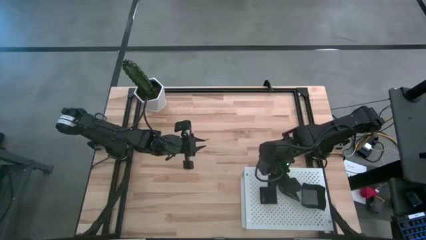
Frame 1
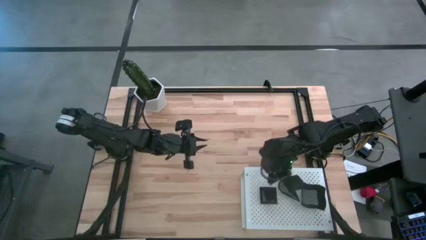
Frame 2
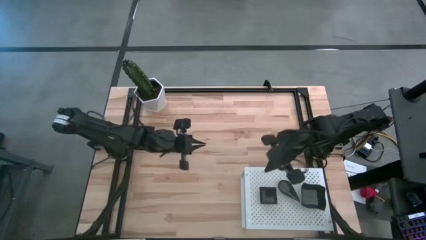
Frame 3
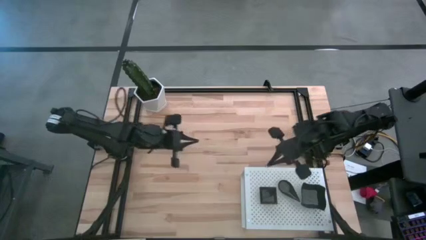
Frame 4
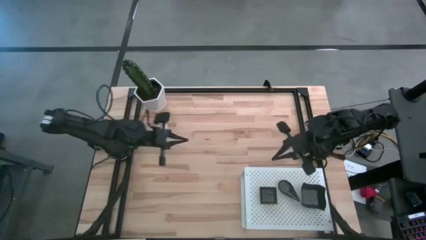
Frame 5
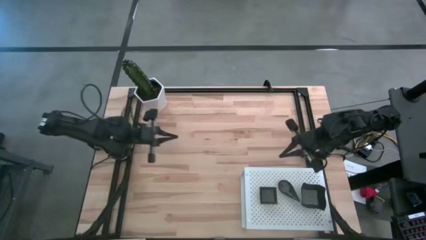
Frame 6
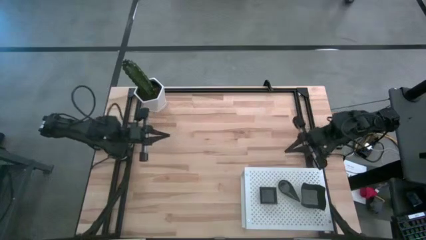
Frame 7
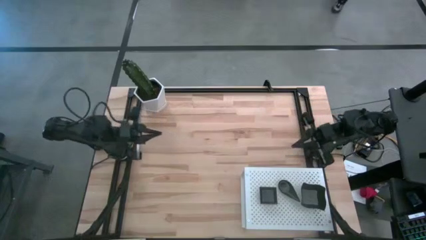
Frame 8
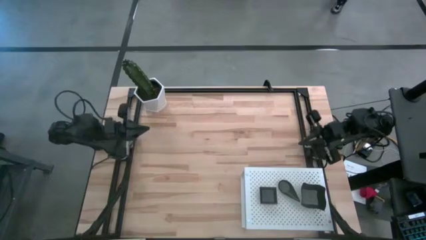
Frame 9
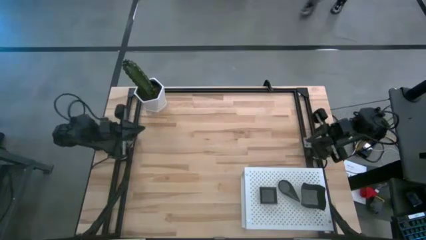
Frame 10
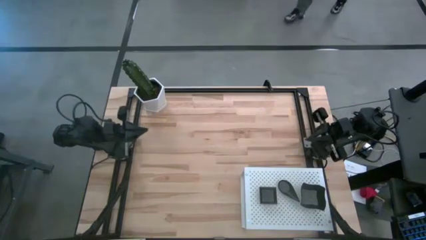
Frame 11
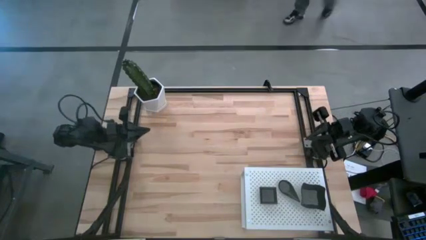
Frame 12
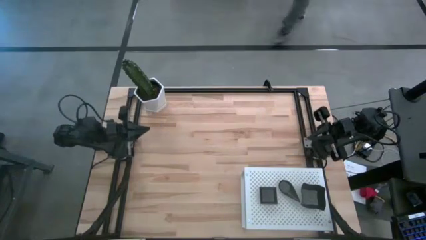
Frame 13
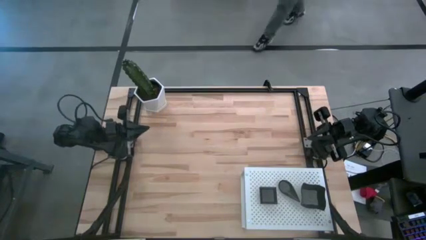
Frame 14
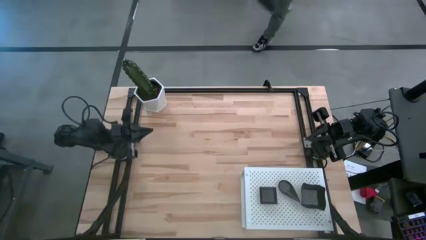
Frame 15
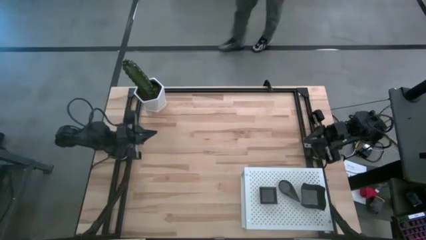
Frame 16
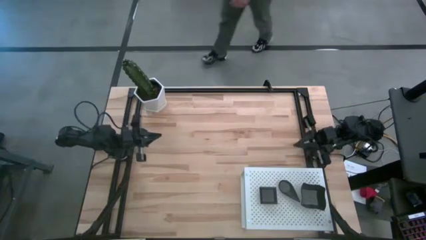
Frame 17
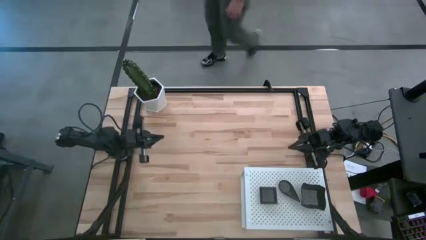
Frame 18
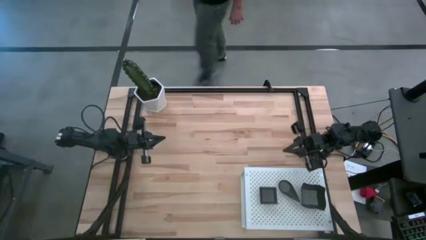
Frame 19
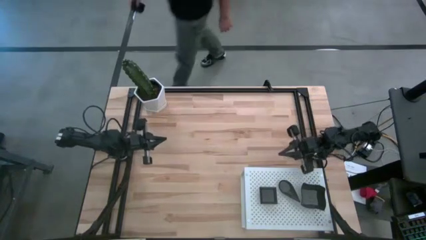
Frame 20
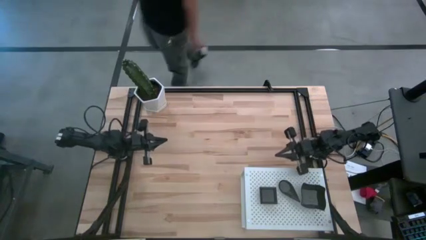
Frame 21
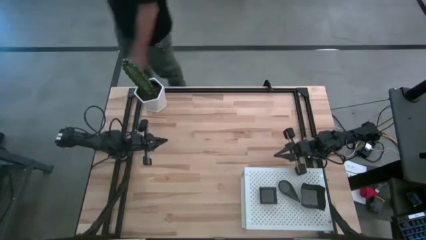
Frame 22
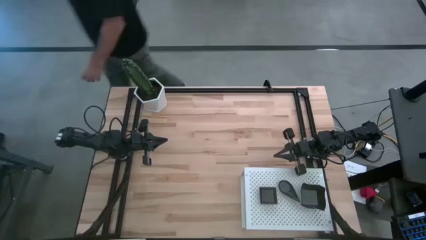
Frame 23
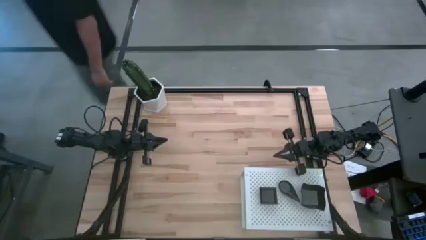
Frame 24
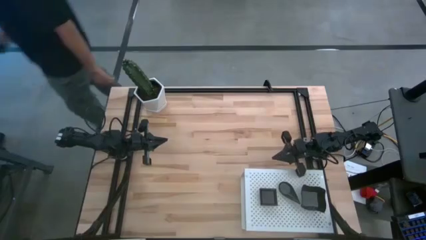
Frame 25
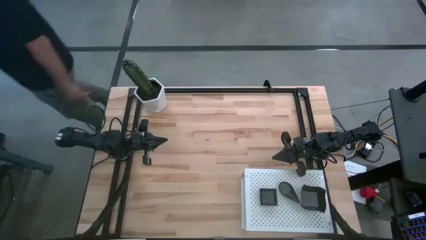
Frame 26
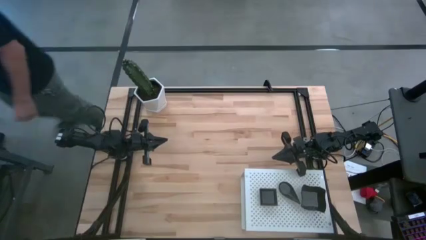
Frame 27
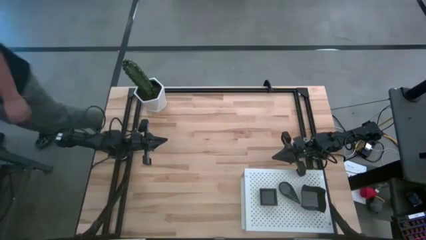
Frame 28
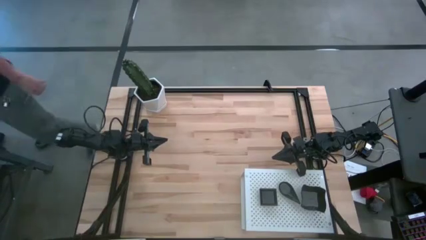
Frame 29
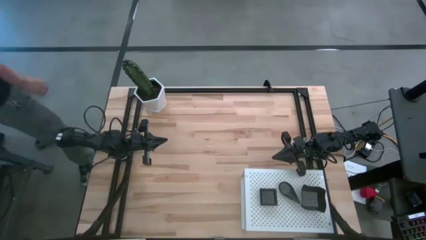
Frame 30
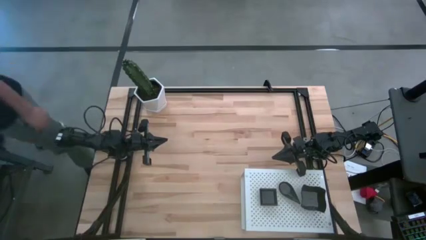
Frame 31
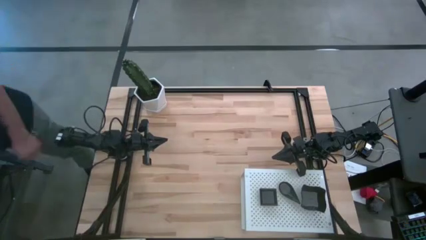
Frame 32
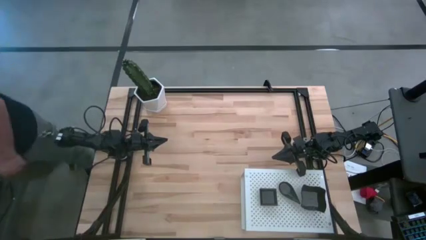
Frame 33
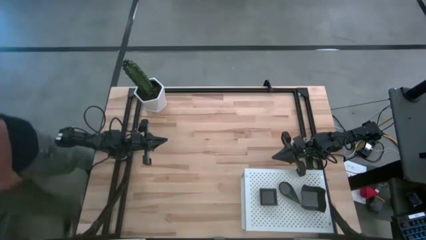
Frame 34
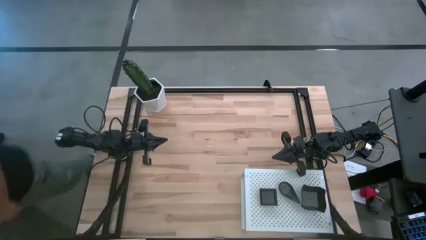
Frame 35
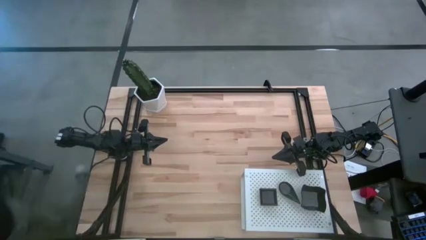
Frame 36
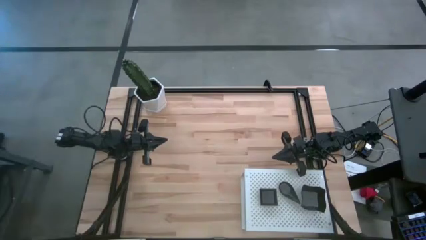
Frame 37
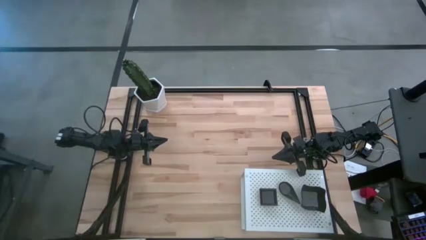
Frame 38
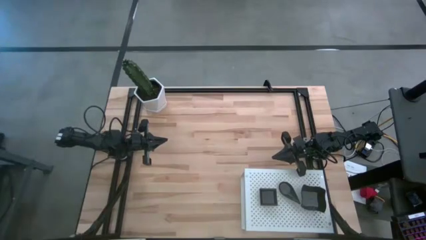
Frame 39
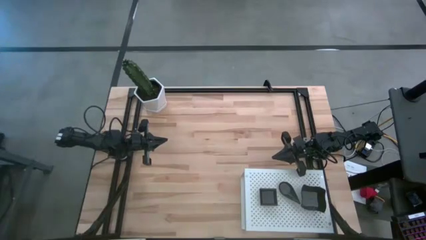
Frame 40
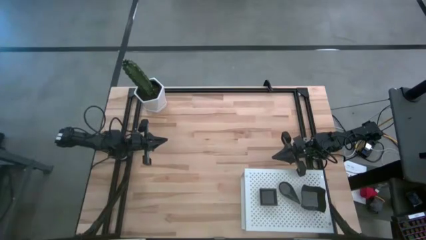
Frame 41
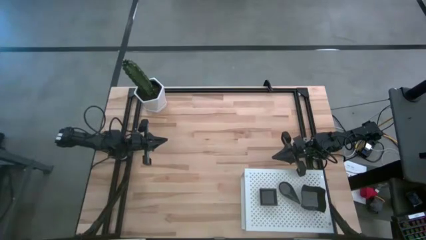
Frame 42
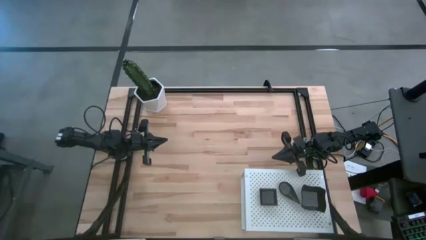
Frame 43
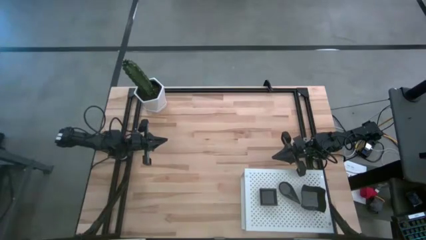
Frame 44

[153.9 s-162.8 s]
Task: Pick & Place Mini shaped plates
Return to Home Position

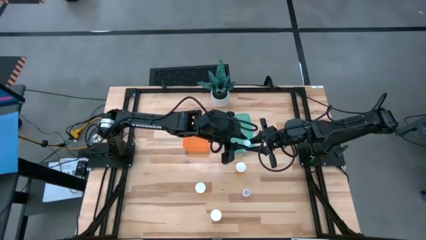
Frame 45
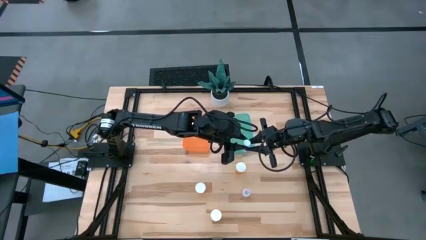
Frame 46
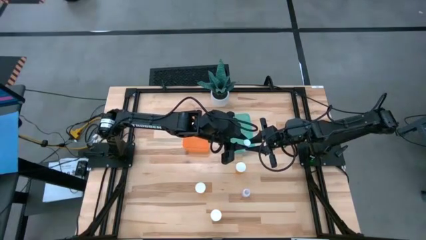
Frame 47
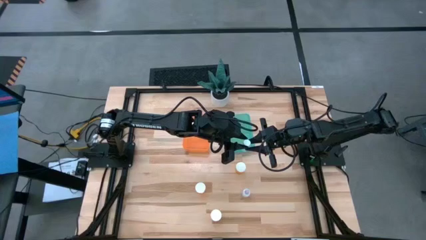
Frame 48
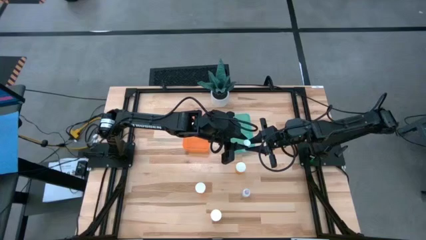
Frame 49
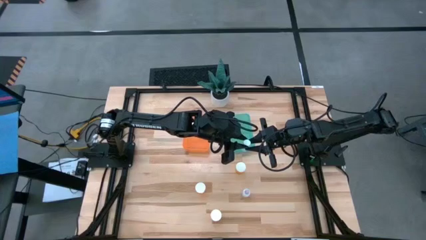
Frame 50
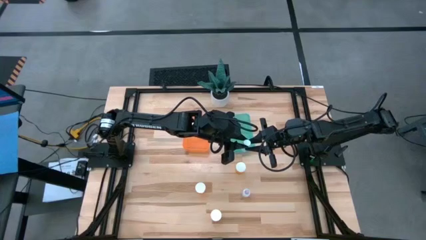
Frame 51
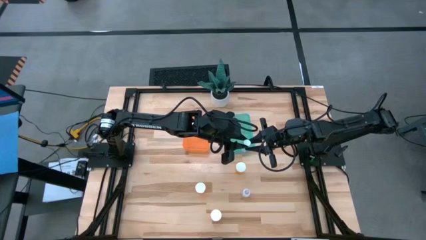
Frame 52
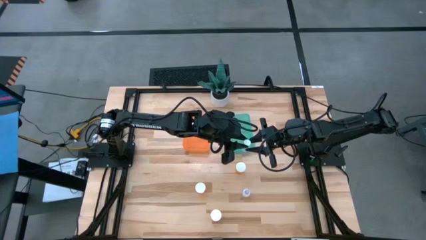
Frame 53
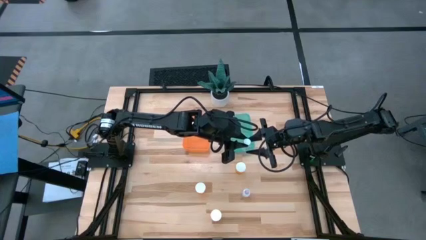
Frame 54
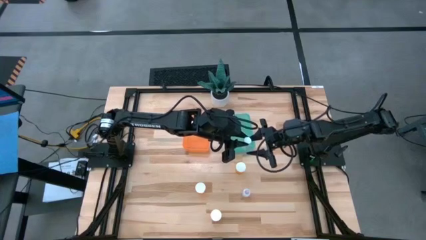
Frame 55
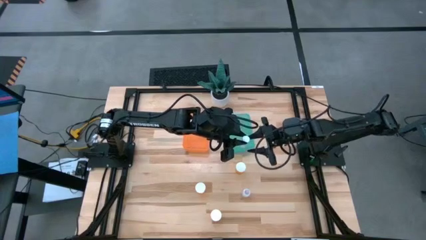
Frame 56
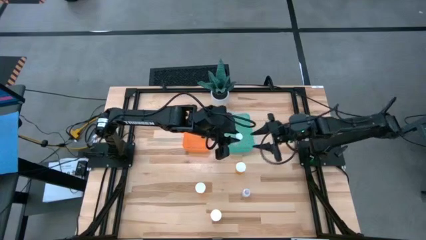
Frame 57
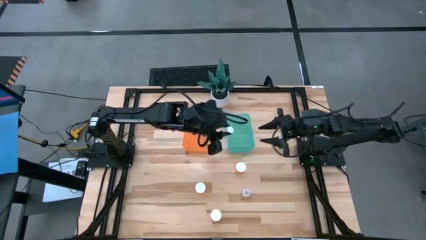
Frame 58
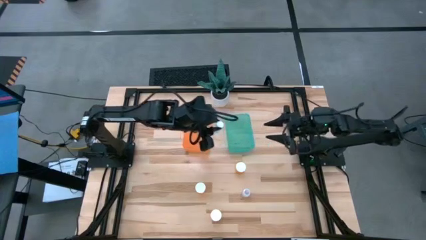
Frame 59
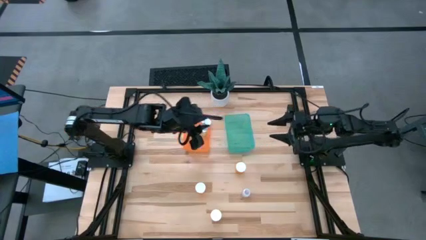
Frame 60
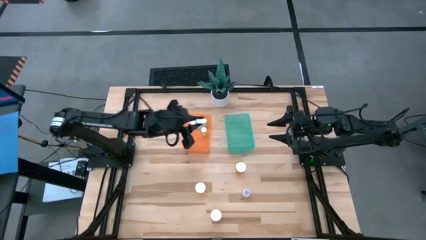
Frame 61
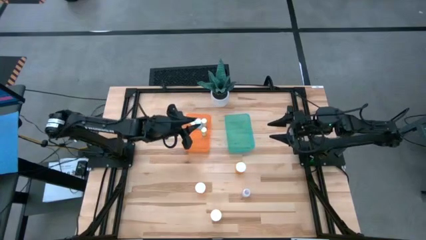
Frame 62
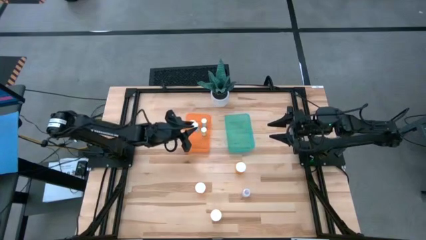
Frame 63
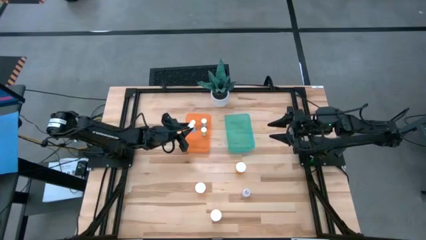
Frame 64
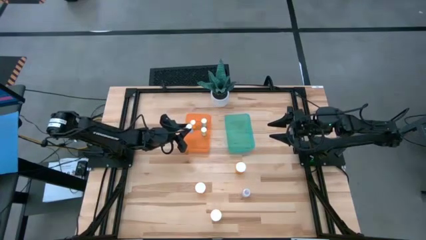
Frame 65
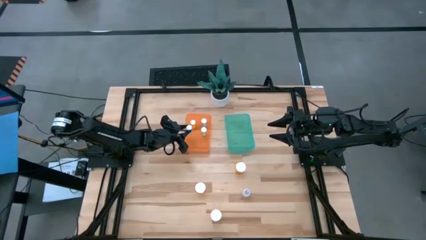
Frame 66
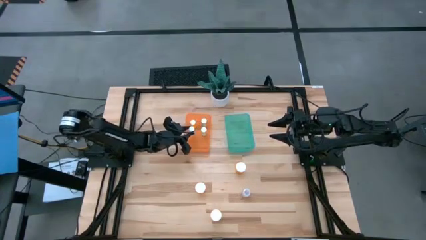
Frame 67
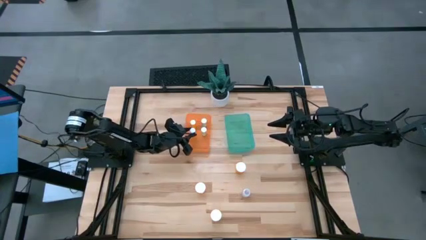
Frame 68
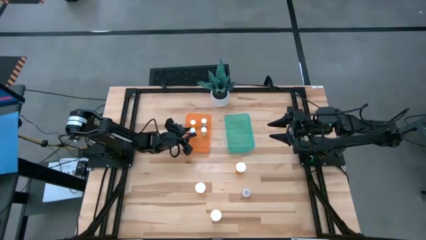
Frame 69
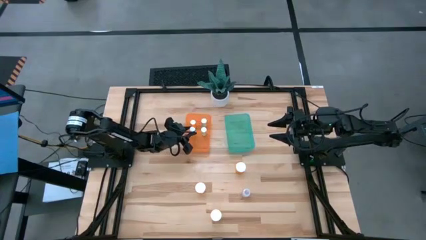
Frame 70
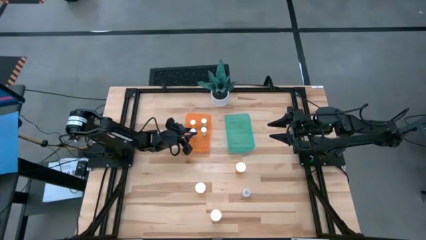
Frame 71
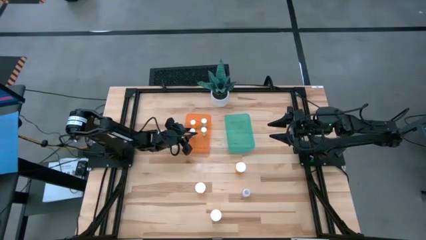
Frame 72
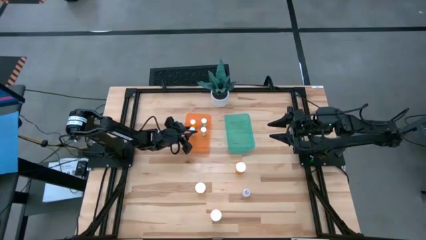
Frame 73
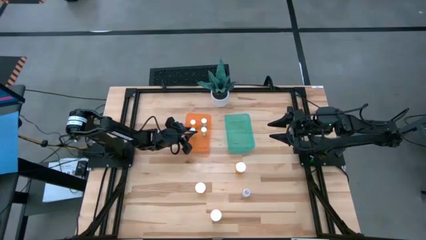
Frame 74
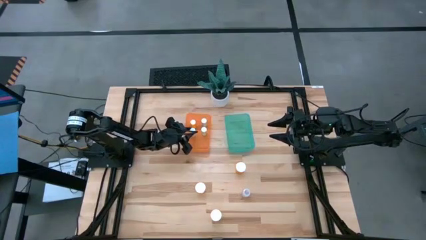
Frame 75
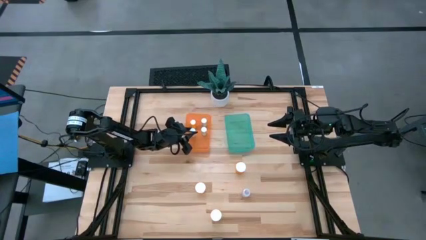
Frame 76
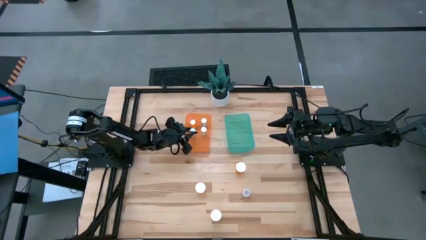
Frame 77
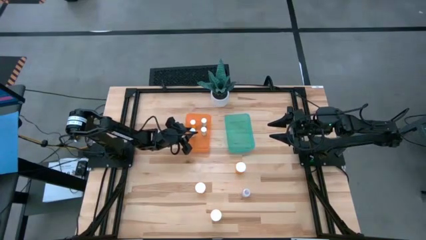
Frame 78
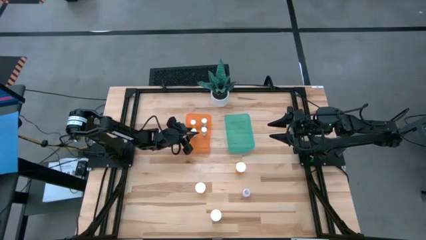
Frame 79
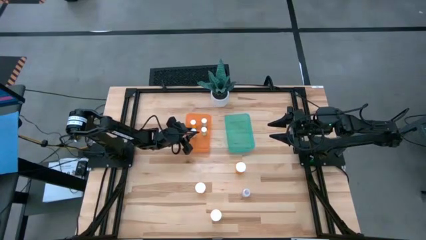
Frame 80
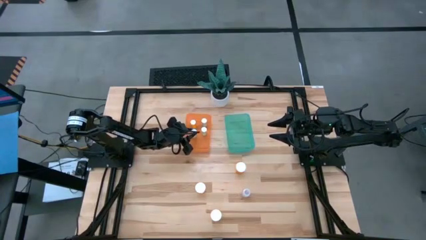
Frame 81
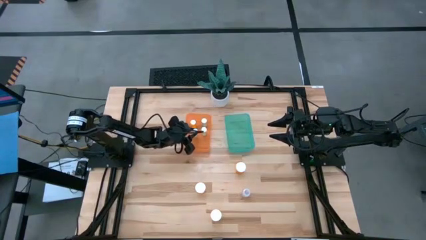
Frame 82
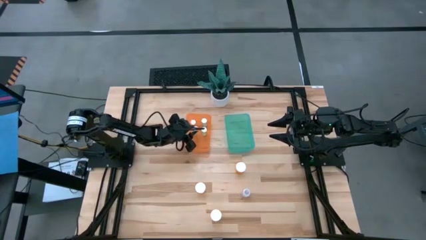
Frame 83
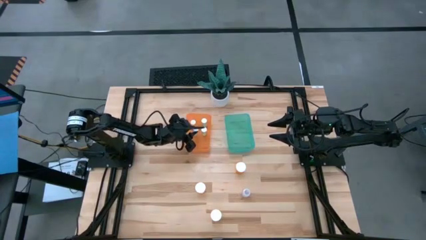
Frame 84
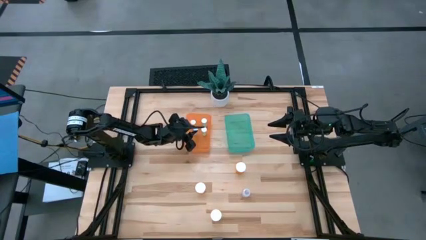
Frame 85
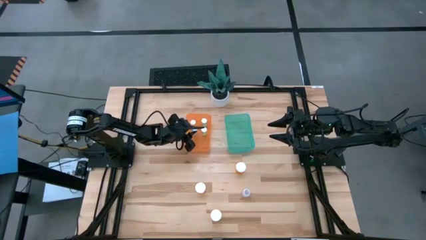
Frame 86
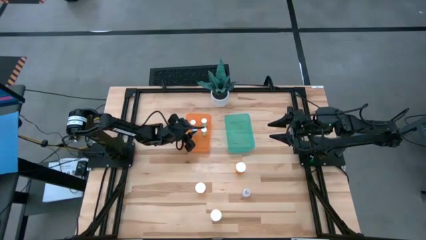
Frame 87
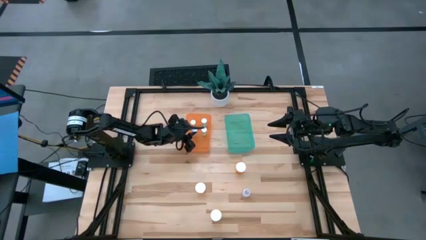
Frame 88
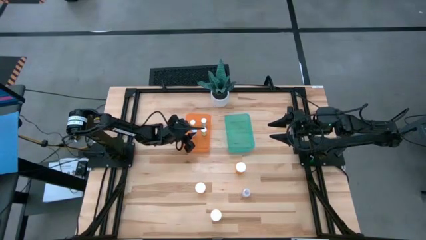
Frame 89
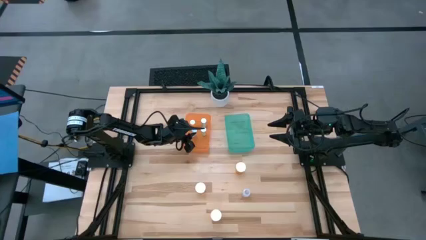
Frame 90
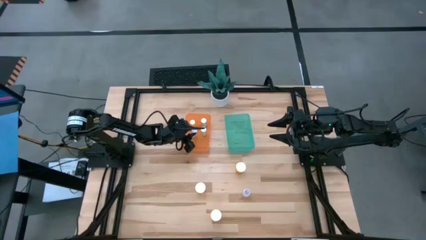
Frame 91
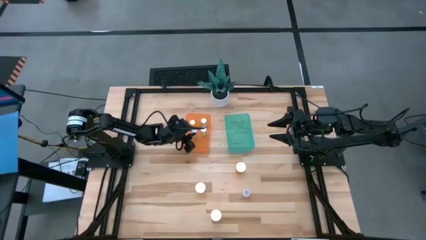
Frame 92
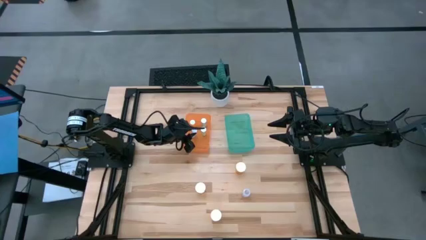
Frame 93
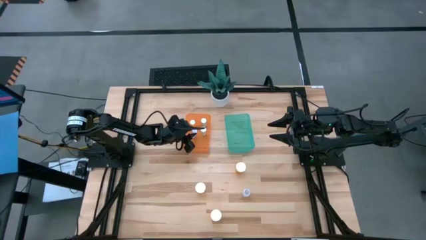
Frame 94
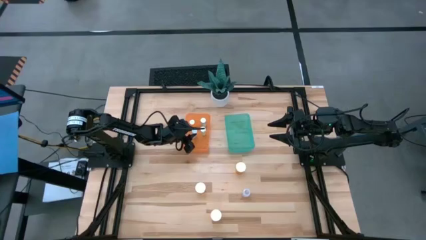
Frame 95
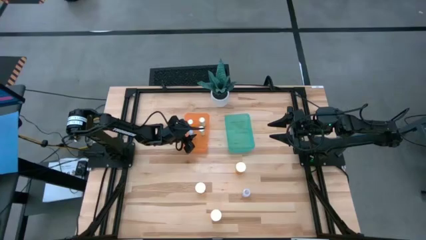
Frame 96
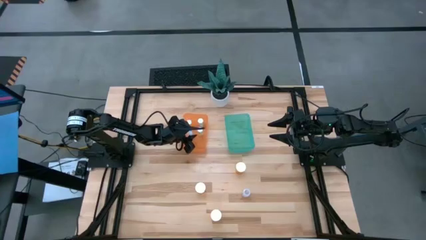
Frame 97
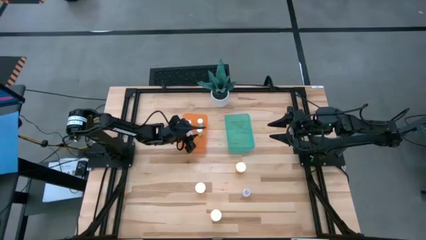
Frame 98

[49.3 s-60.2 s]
Task: Pick and place medicine bottles into bin by pill shape (circle, oval)
Put the blue pill bottle into the orange bin
